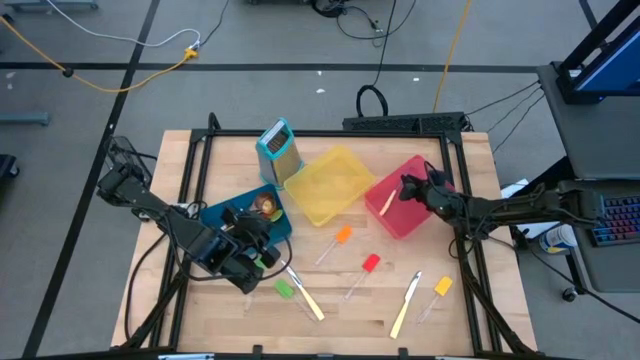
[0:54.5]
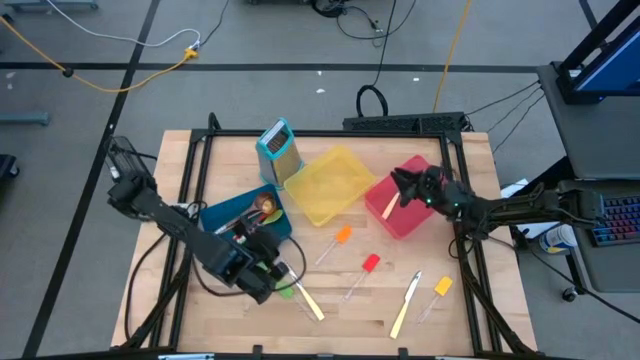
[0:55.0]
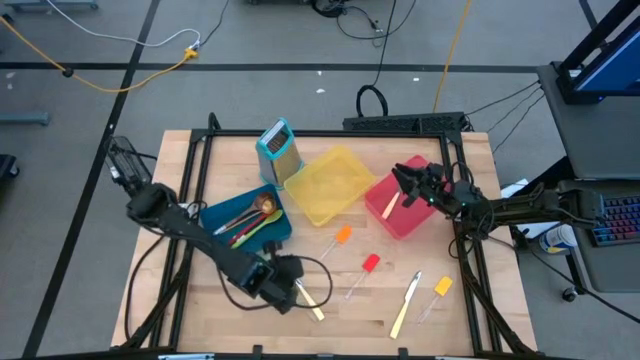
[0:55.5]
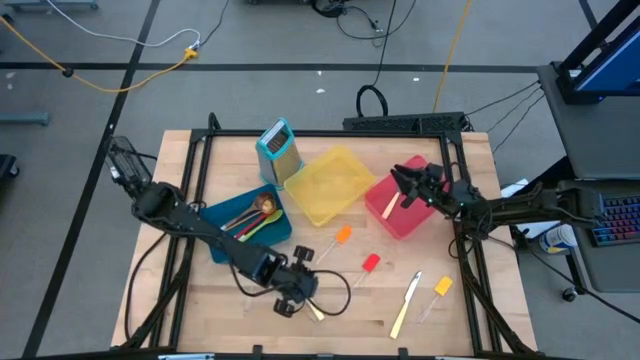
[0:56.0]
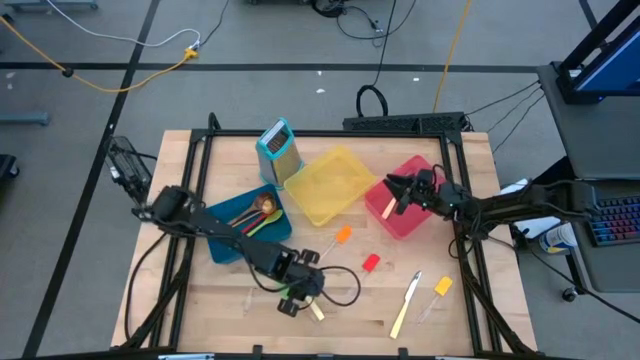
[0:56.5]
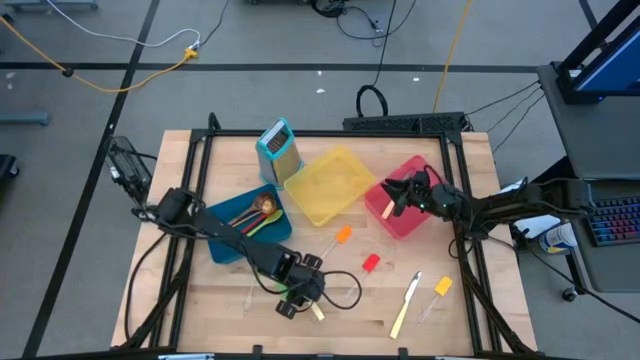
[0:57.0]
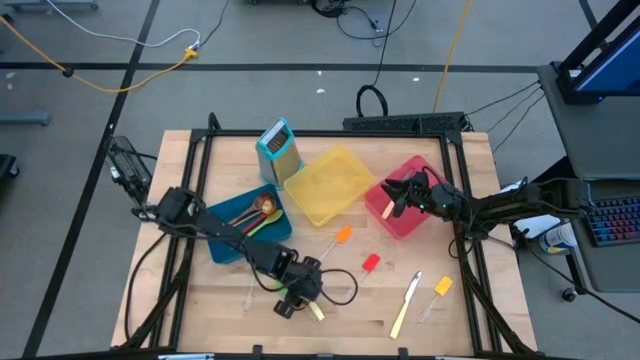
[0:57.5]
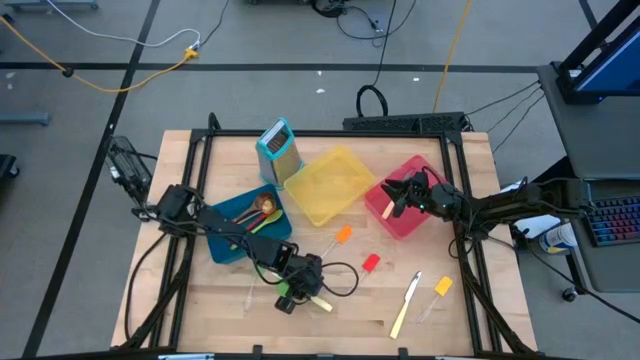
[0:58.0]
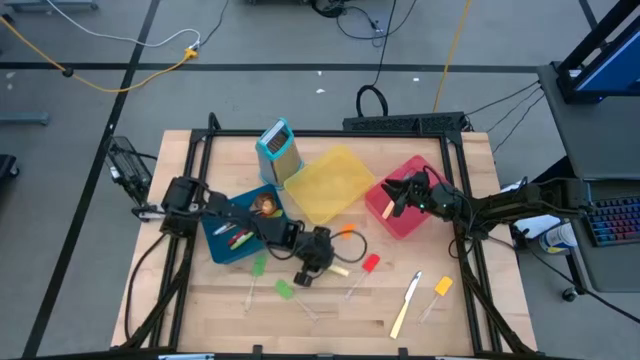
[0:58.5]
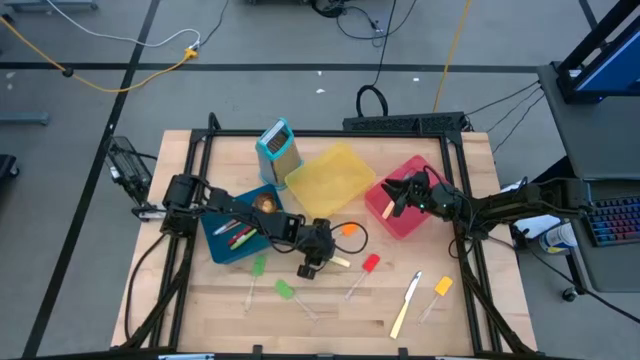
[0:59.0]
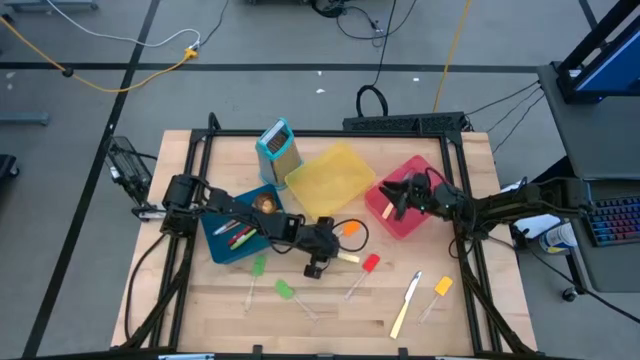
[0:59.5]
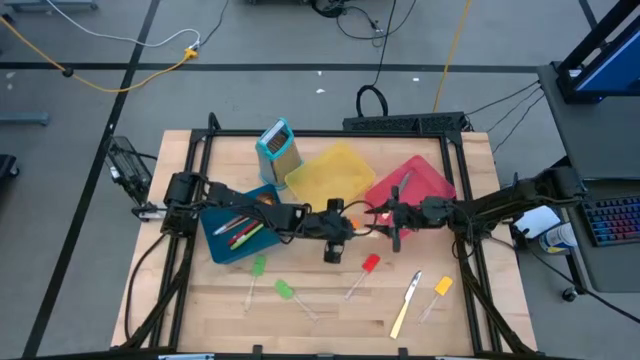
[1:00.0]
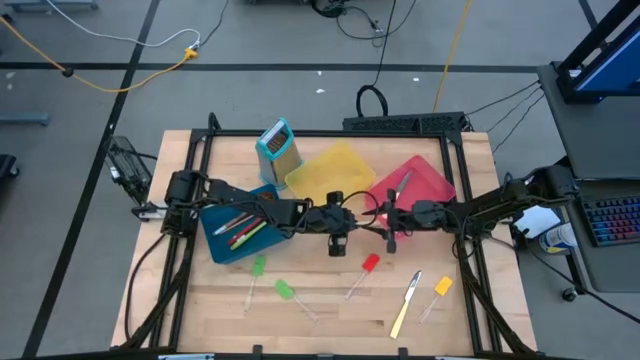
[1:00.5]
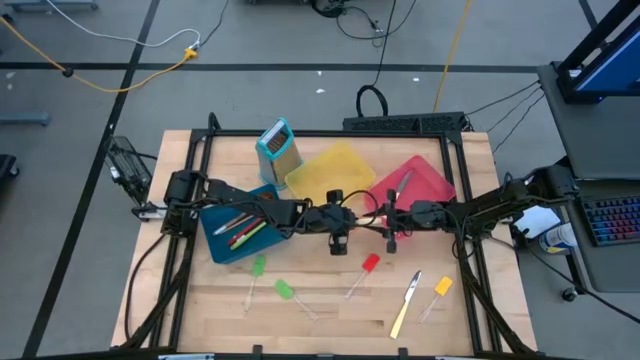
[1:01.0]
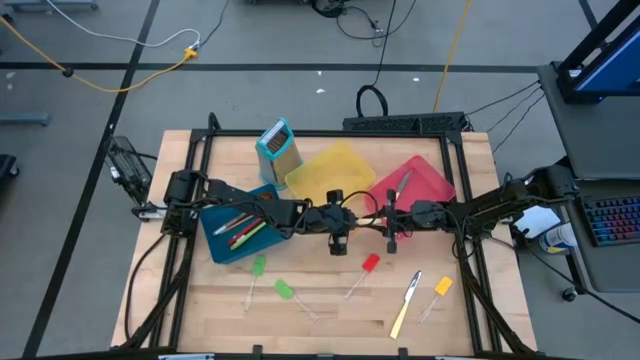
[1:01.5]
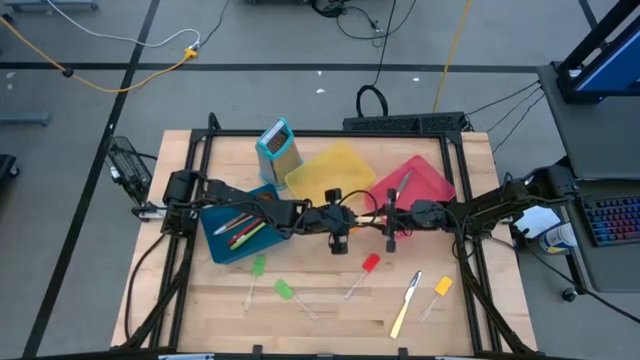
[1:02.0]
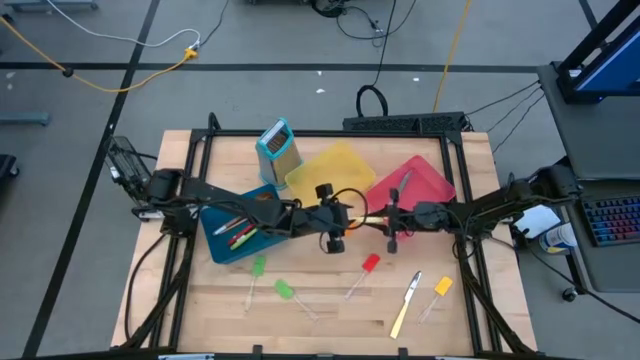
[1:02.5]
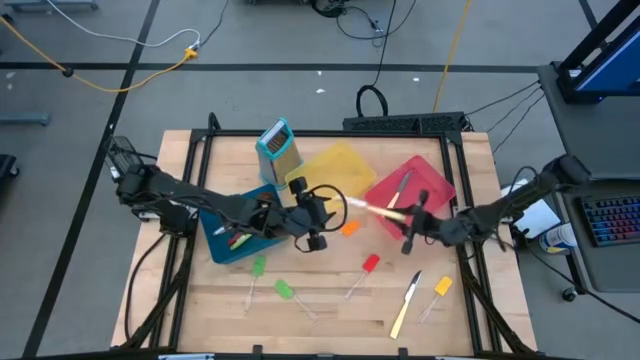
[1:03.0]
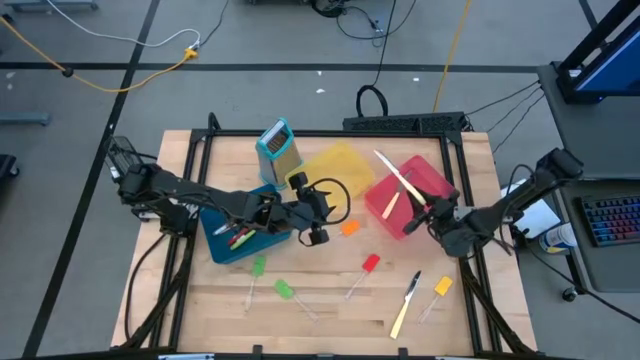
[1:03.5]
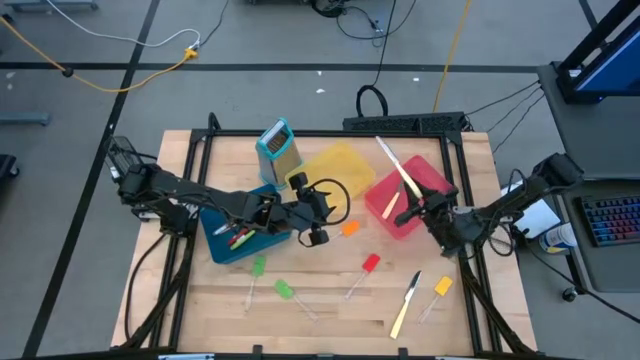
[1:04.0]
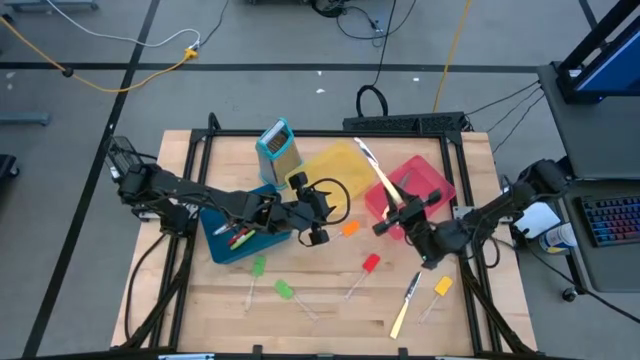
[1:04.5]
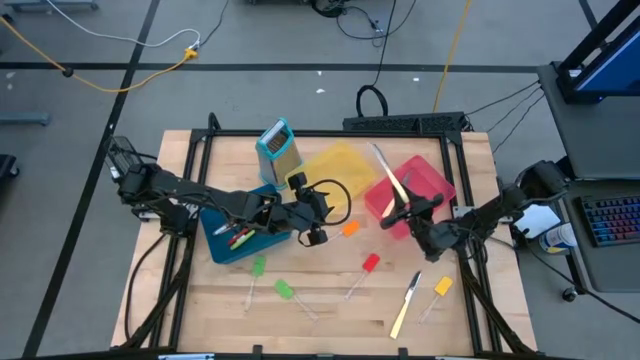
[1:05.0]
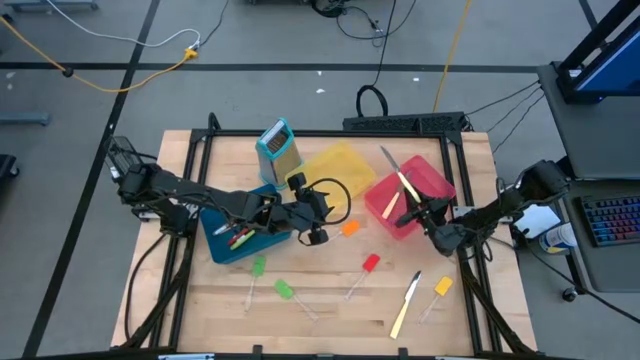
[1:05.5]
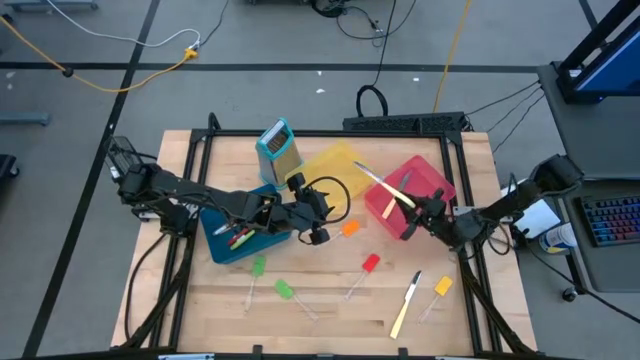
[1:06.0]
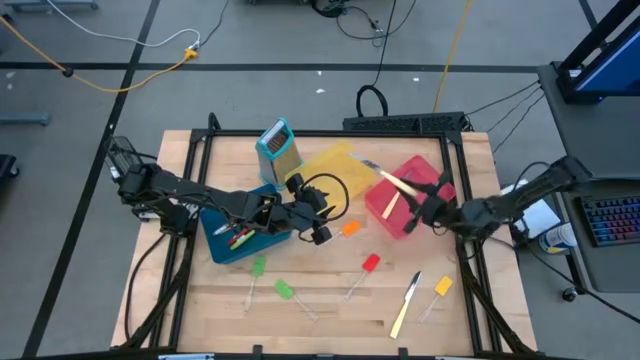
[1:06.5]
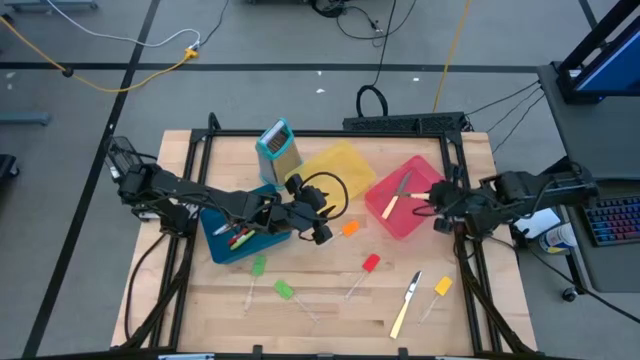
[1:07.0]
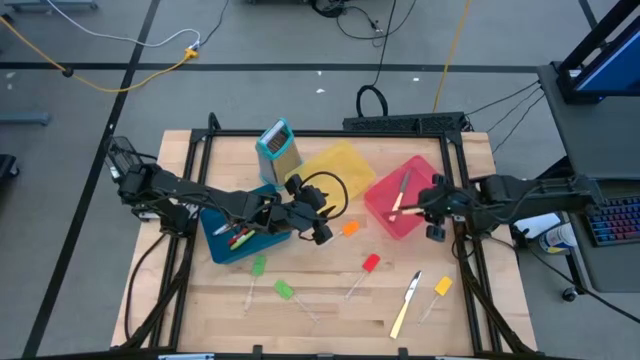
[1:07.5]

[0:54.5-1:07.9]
Task: Pick & Place Kitchen Items
Put the yellow table knife into the red bin

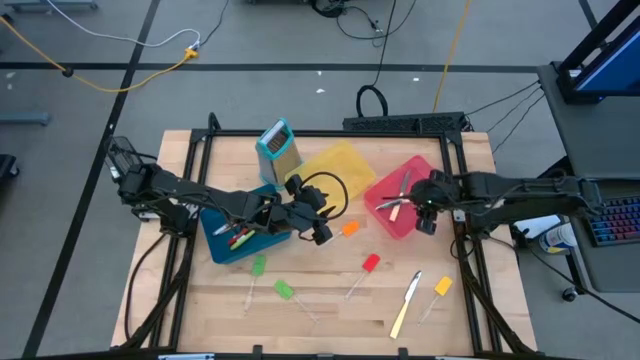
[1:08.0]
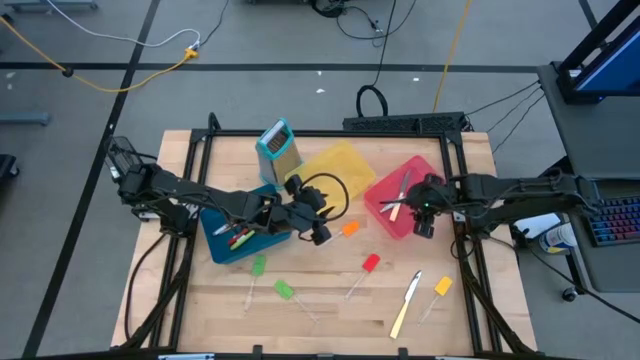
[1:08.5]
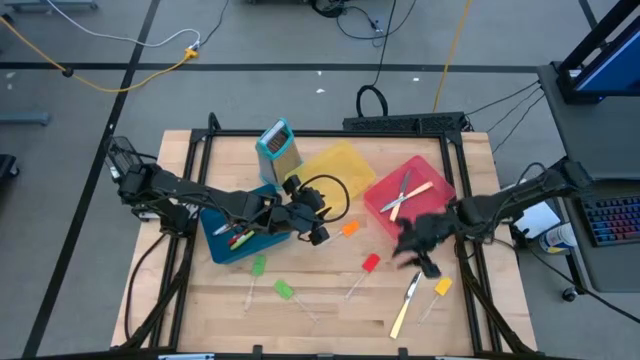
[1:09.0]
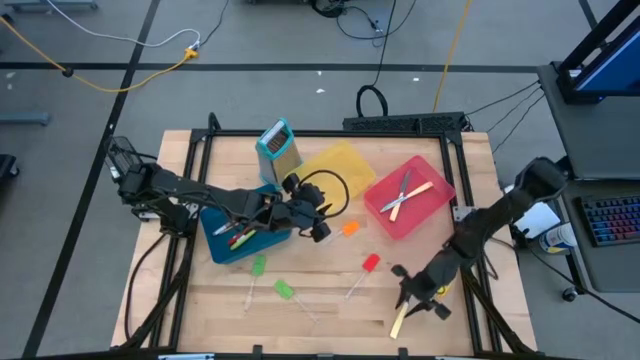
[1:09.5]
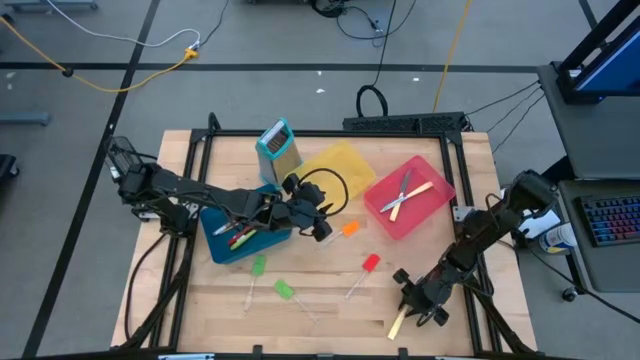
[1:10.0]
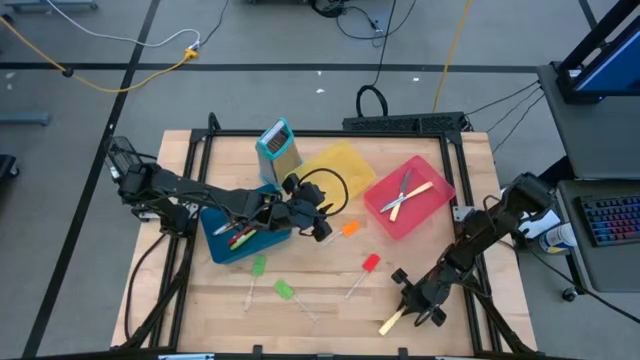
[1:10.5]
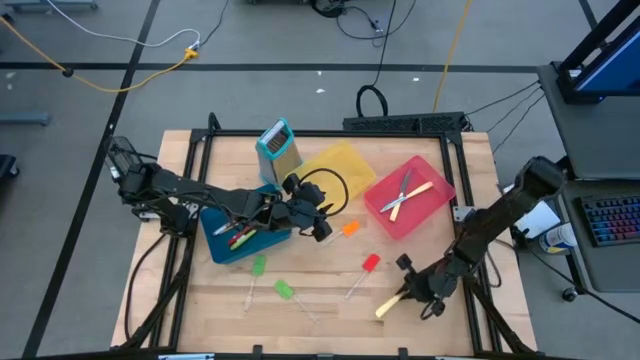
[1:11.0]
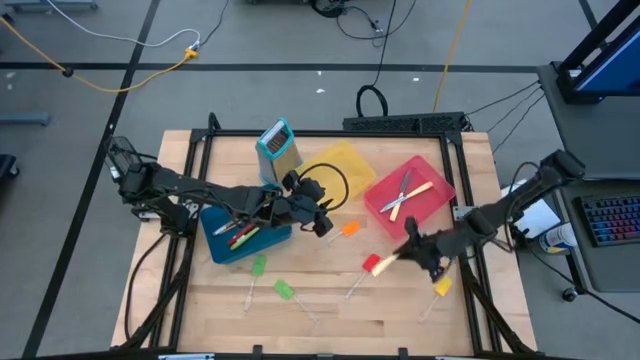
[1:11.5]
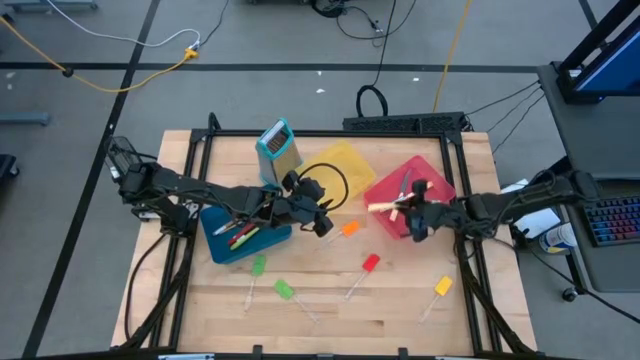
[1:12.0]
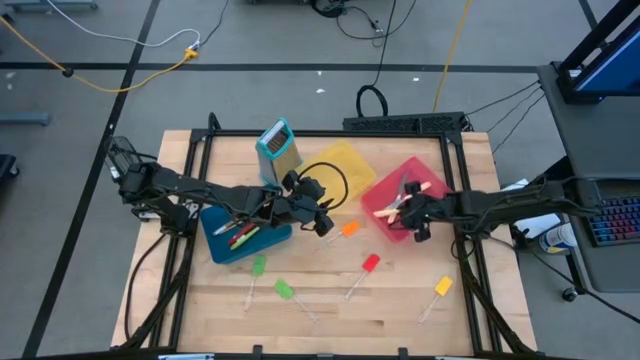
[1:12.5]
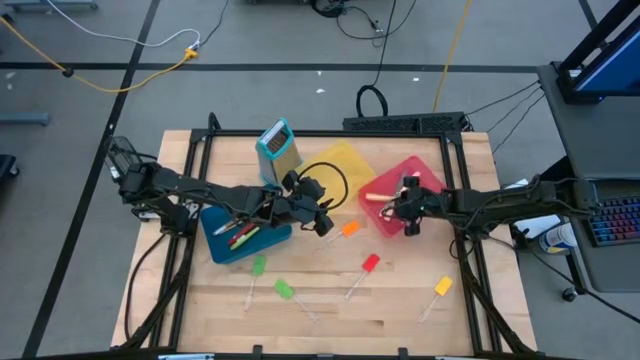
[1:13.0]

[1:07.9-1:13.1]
Put the yellow table knife into the red bin

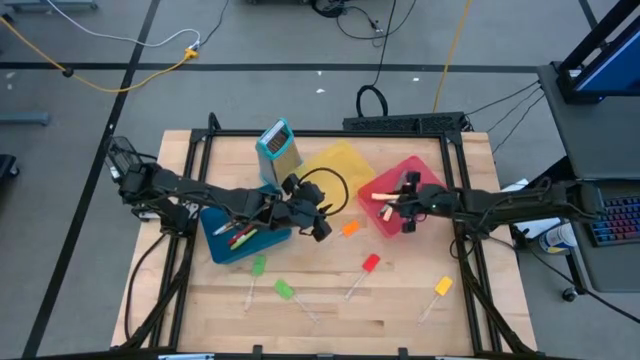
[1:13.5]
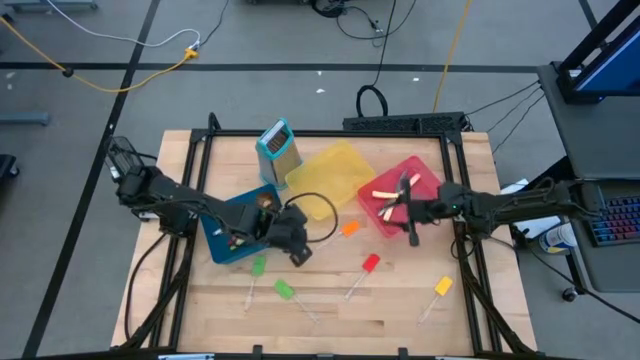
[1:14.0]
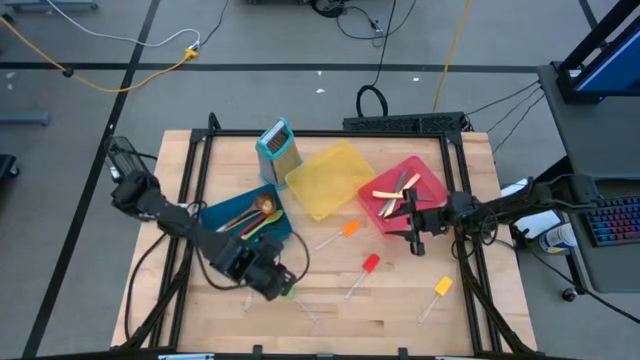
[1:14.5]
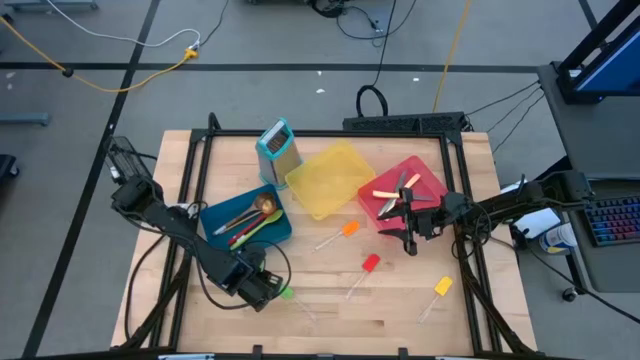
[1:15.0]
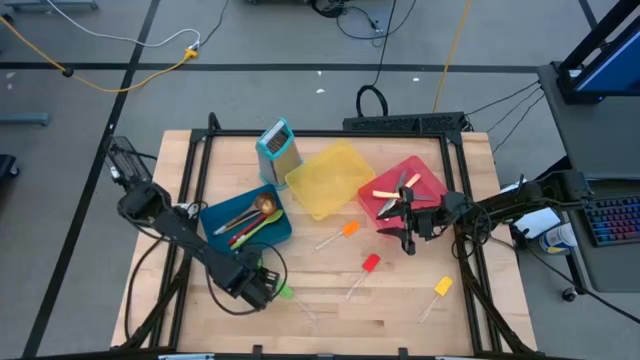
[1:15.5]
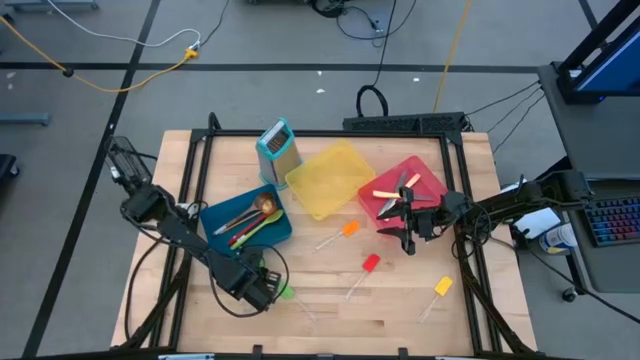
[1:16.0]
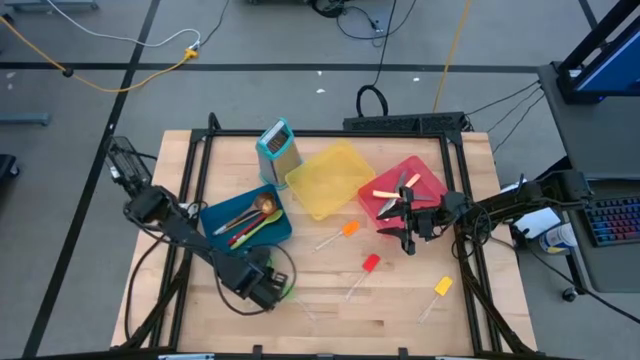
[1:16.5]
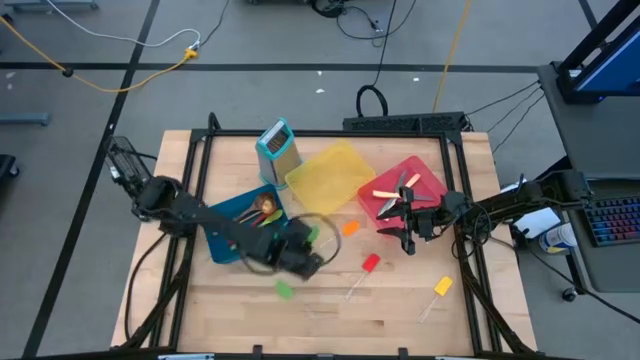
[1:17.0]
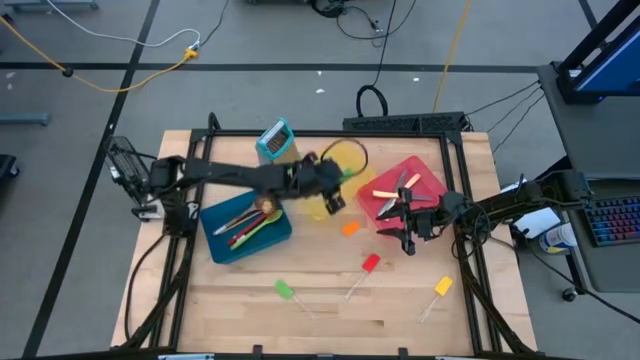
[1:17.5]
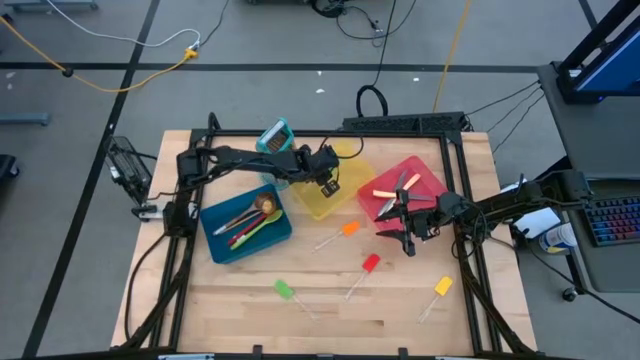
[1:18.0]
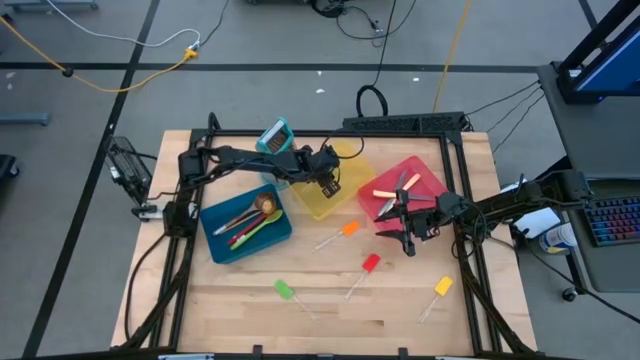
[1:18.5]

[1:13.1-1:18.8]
Put the green spatula into the yellow bin
